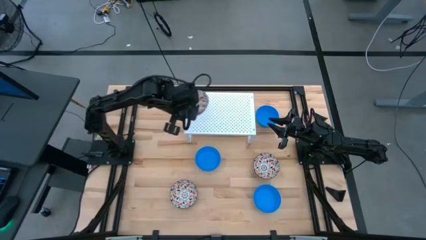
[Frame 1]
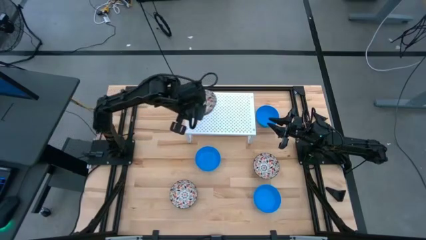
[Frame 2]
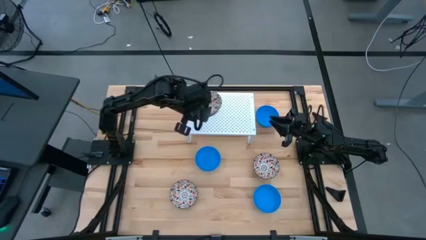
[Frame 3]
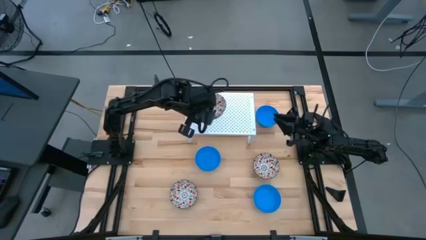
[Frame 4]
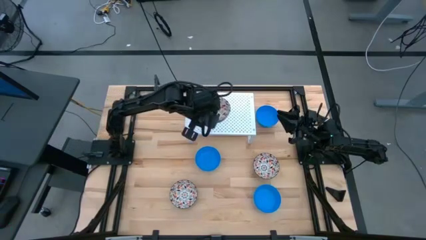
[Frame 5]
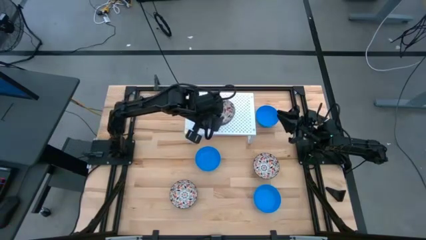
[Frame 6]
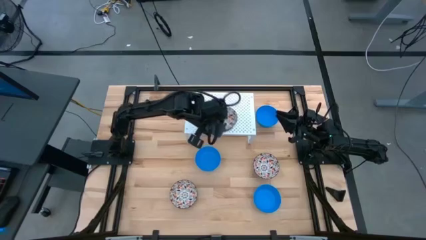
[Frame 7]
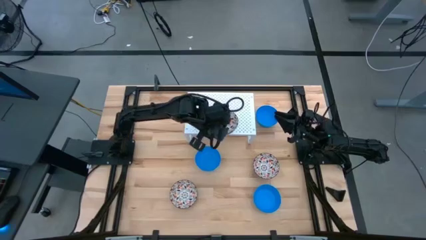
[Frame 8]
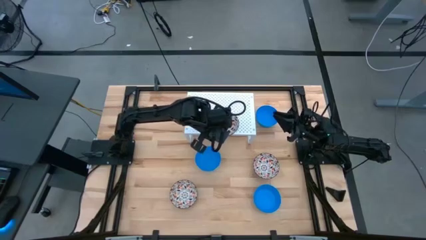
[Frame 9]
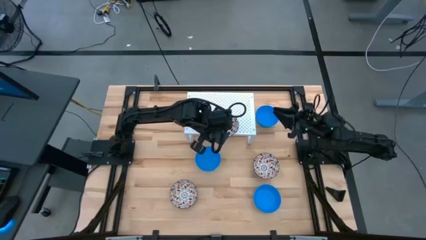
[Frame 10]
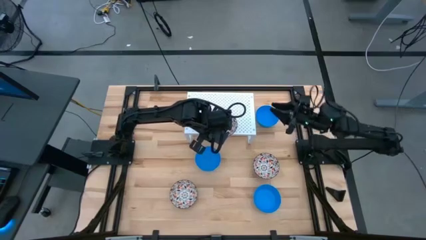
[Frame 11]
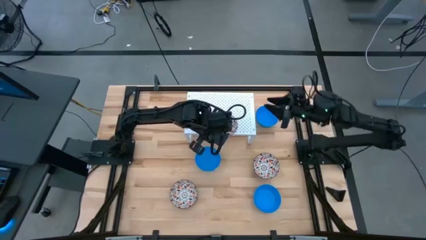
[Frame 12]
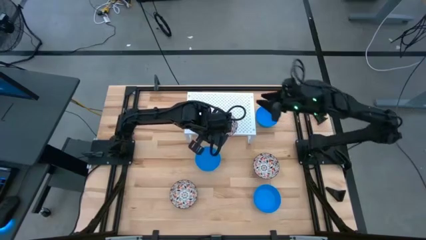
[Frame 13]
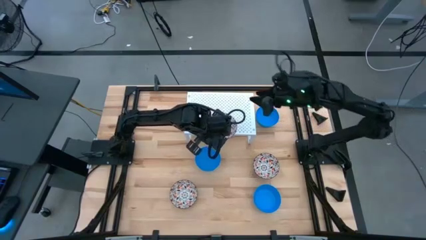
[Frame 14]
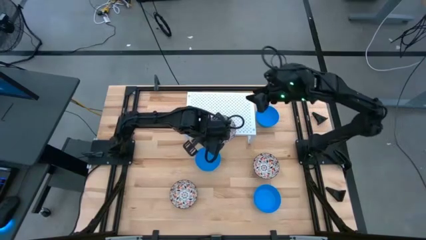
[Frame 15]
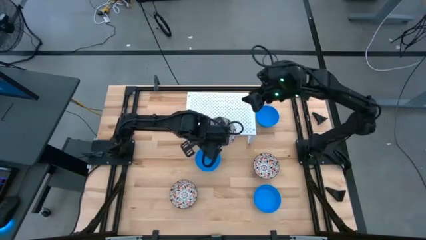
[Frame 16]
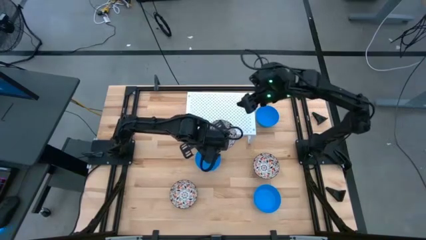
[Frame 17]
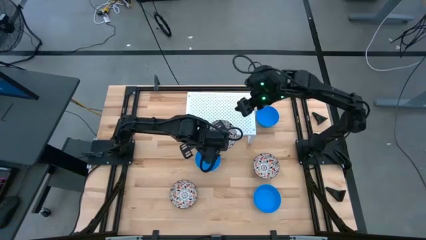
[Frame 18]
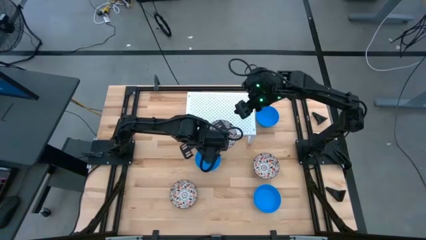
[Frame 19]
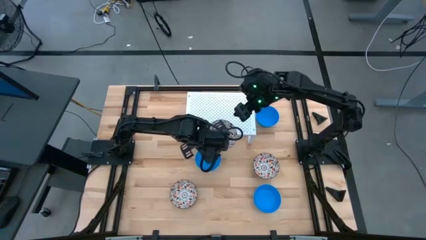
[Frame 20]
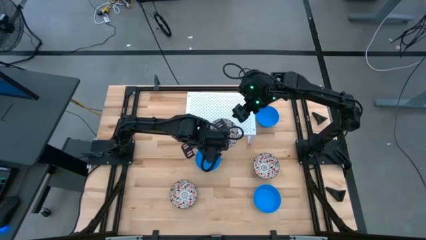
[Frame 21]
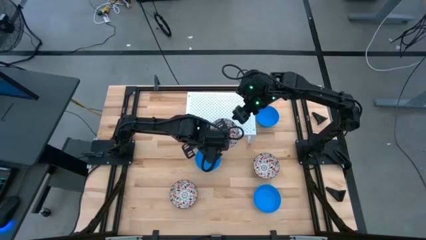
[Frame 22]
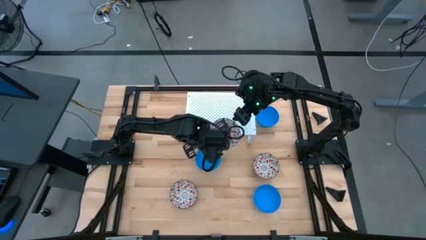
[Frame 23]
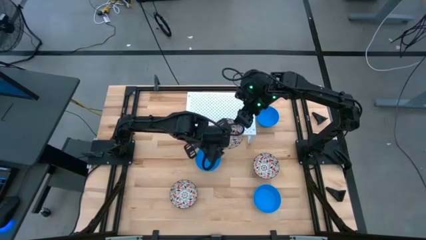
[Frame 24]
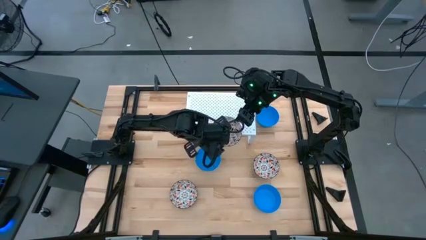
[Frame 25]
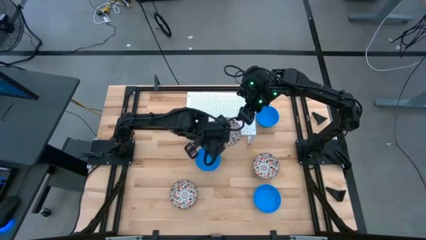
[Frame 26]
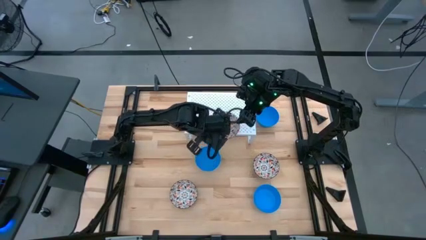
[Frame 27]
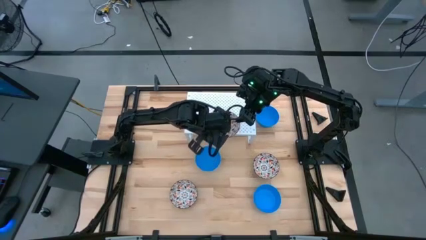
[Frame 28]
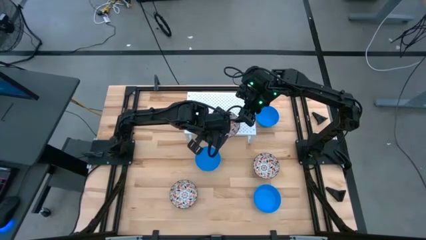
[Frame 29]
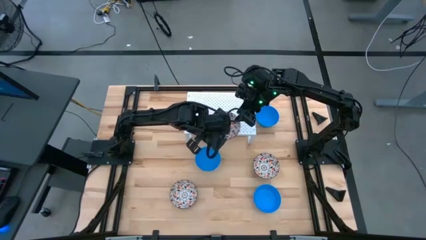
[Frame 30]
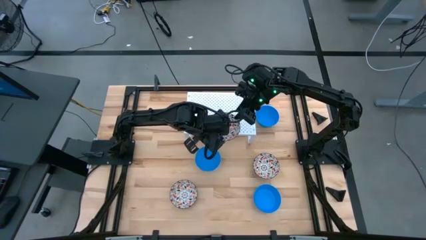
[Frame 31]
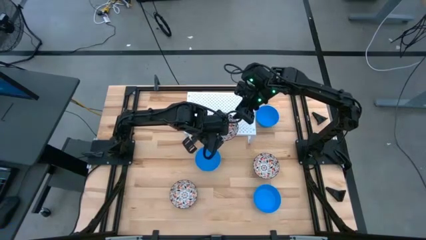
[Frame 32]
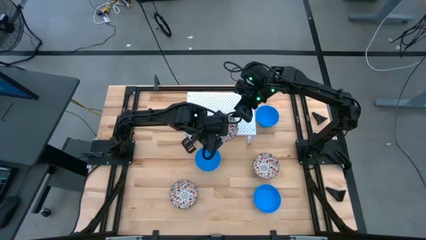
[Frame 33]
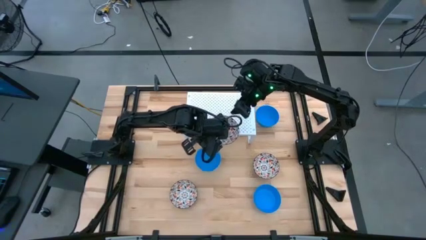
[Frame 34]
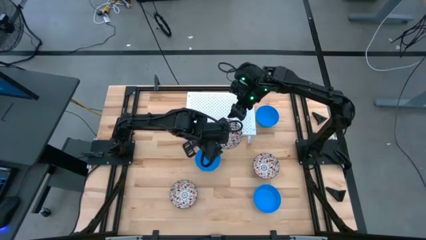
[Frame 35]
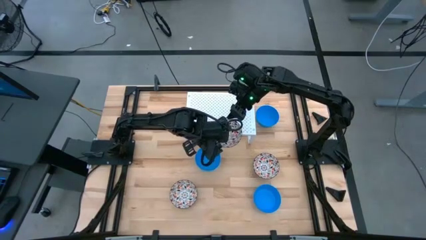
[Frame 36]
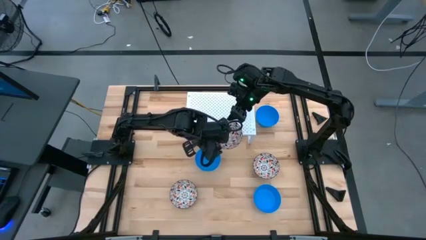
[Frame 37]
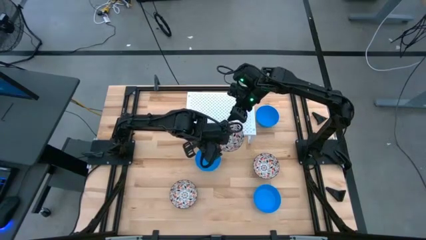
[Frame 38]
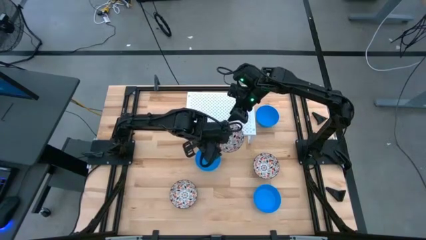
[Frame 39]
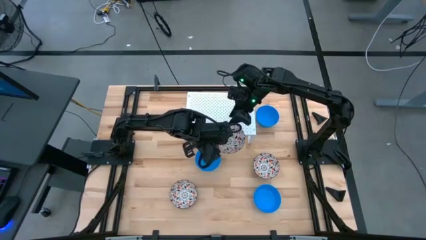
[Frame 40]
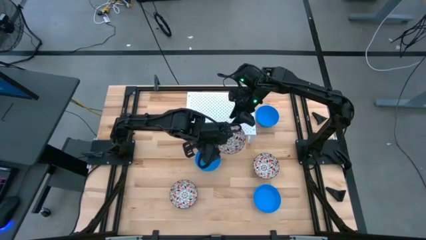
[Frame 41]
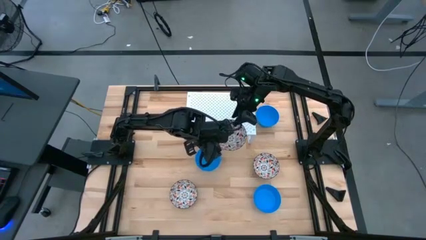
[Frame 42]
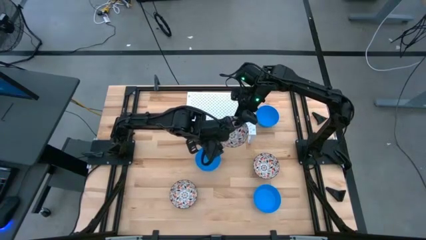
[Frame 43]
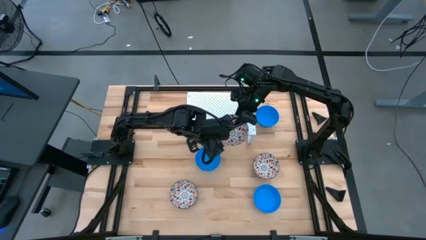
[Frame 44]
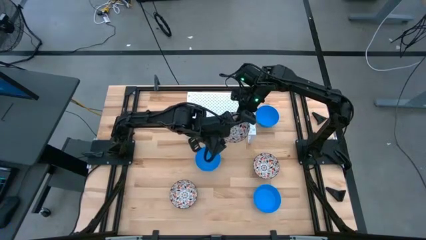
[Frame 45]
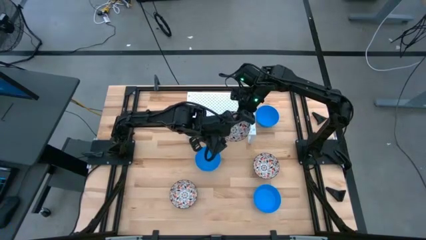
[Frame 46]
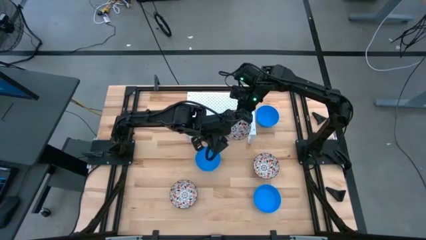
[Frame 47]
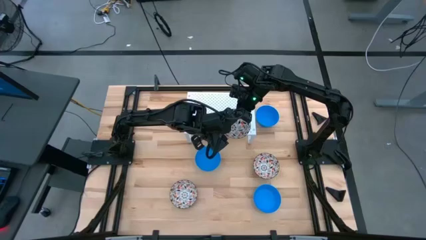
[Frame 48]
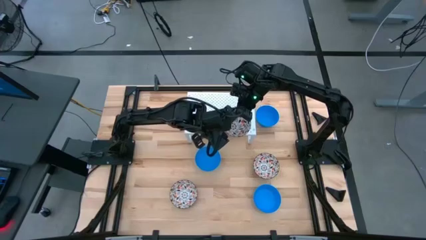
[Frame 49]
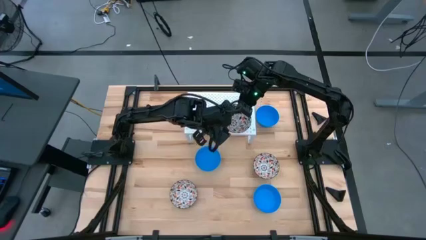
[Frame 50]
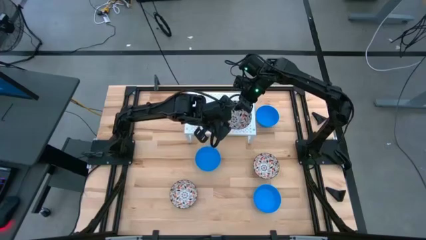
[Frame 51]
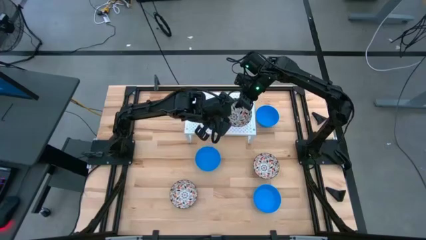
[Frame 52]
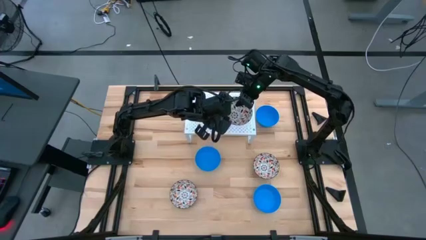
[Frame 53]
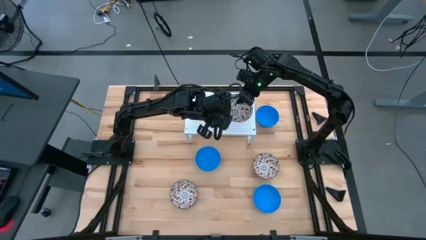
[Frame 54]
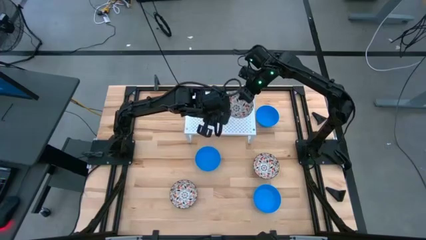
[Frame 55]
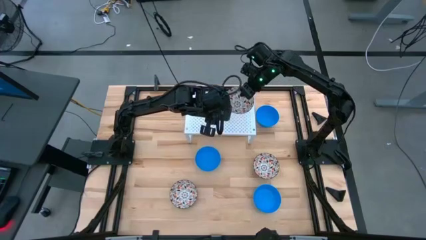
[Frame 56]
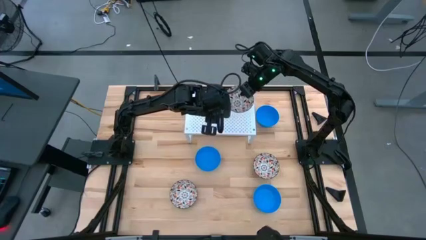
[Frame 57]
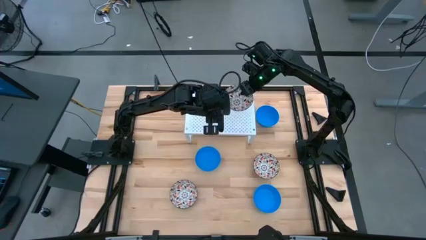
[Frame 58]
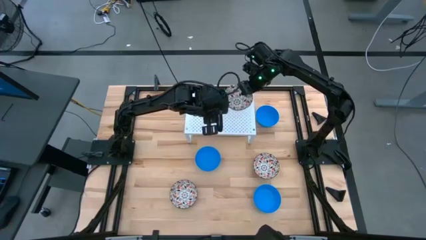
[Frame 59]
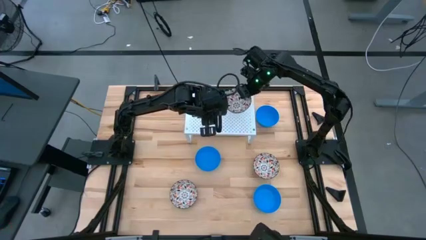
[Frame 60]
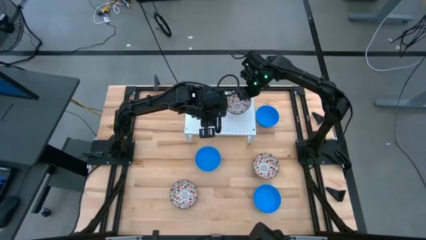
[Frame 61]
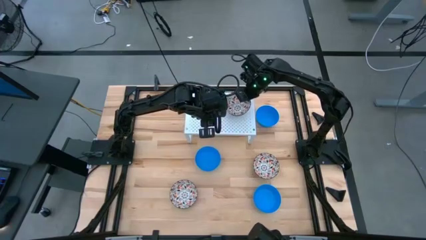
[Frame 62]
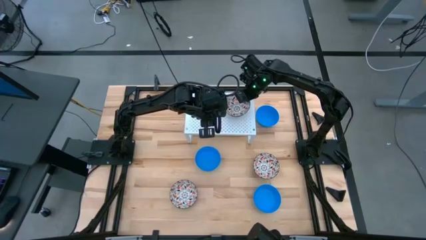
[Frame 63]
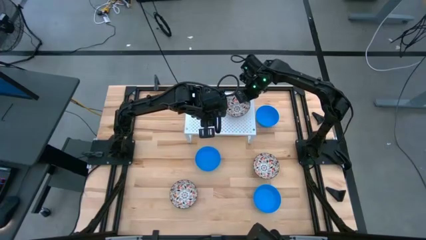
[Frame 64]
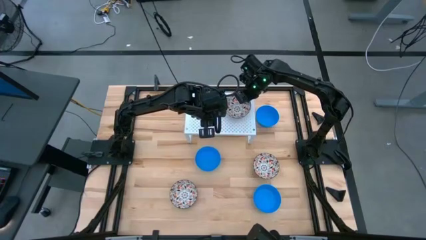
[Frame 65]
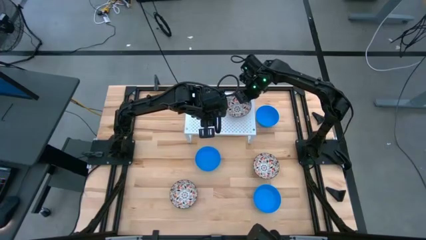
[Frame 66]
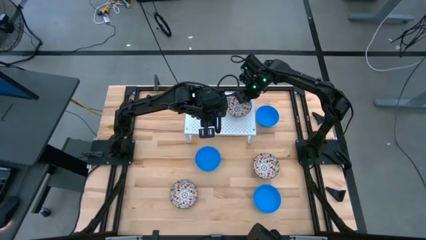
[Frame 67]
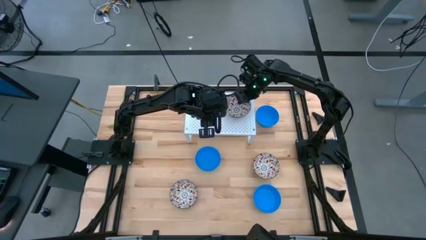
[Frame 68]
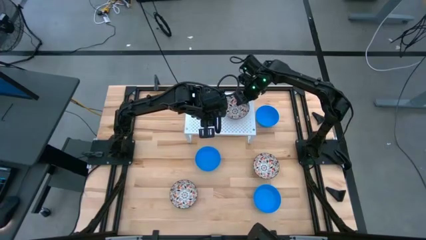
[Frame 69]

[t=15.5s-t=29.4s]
Task: Pick & Place Mini bowls
Put the top left white patterned bowl on the shelf

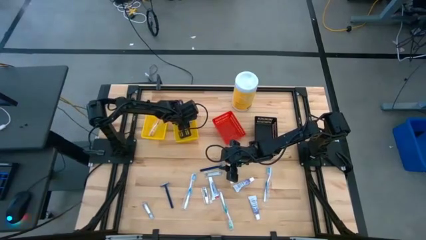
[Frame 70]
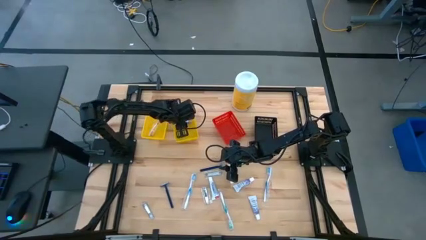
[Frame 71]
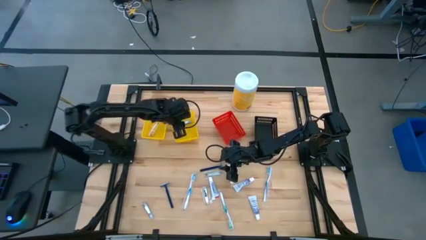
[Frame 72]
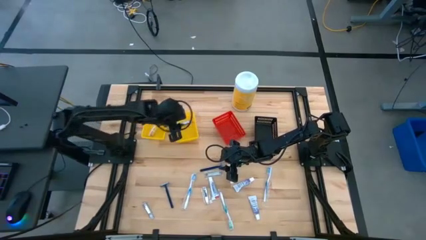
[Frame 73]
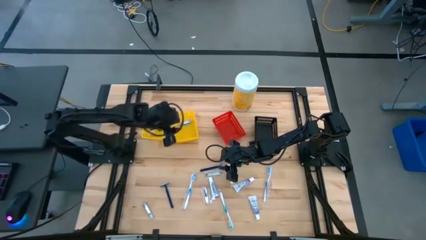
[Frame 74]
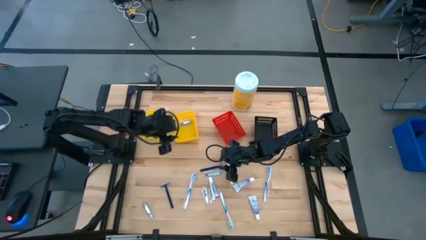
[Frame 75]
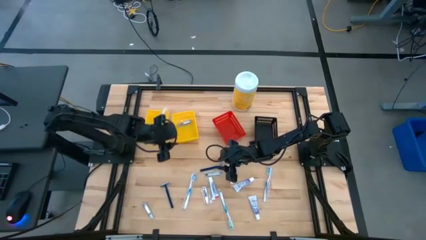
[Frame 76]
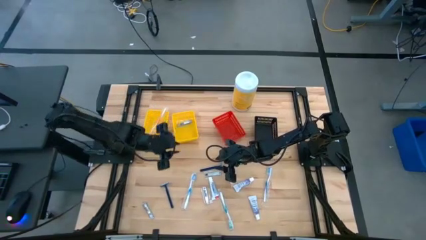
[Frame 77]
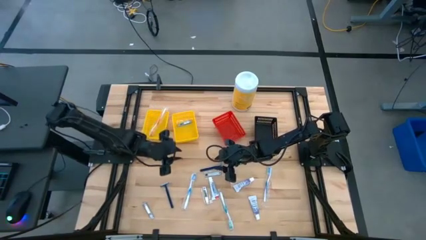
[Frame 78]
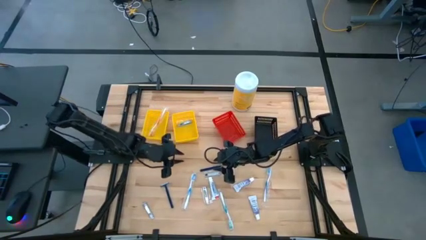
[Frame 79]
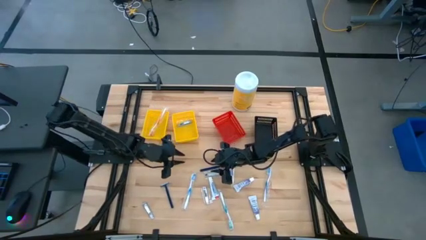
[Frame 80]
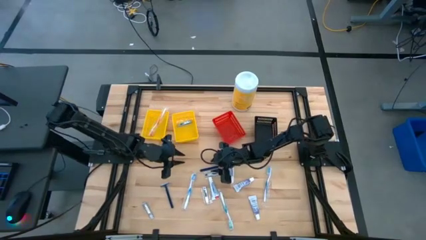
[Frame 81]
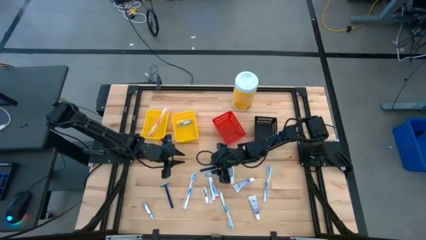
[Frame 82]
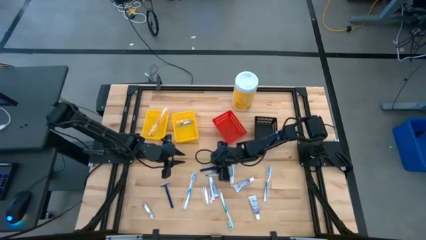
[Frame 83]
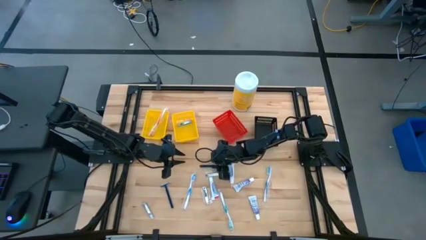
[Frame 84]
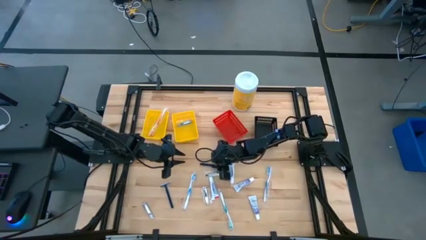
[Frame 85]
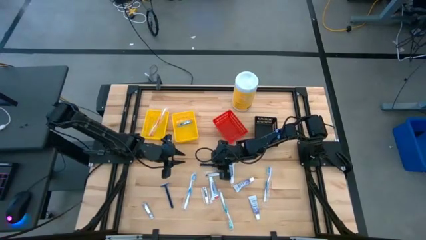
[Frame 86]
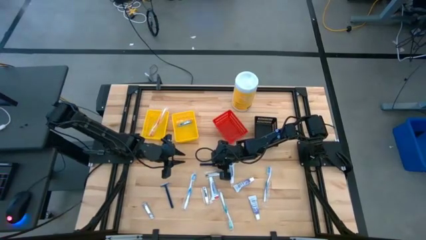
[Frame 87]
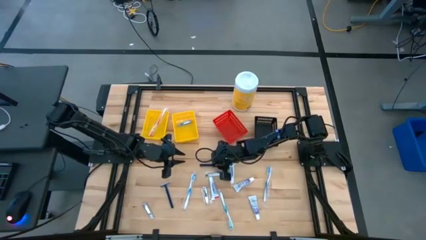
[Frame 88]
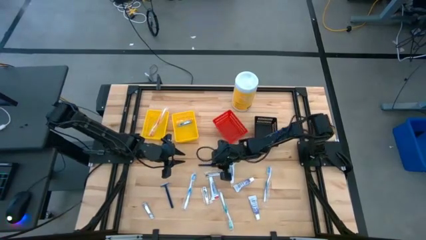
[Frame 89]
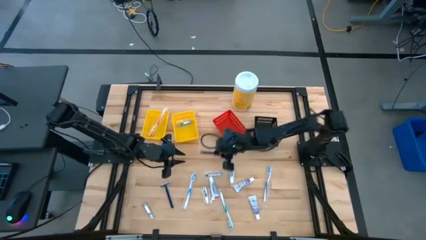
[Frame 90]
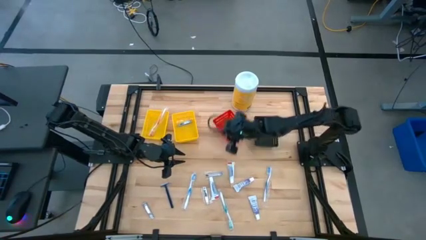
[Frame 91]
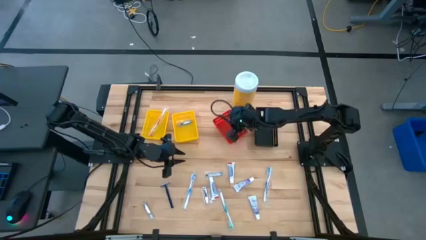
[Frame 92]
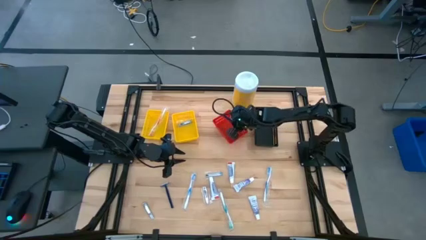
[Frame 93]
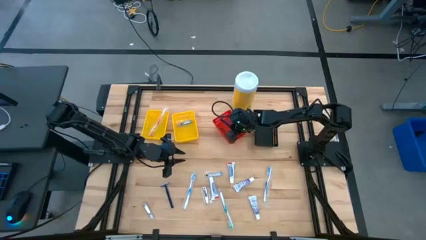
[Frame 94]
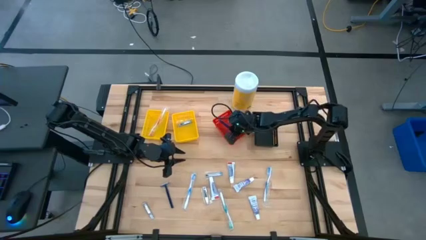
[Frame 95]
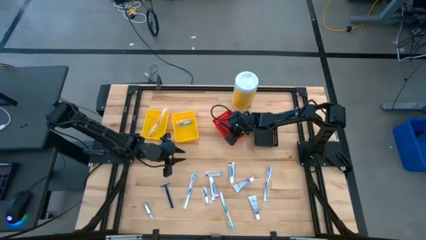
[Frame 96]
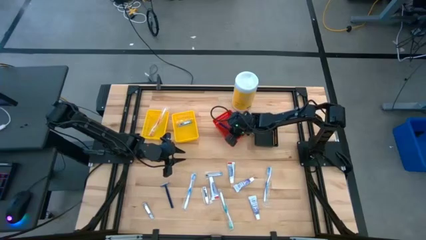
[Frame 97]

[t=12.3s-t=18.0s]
Task: Pick & Place Travel size toiletries
Put the blue razor into the red bin
